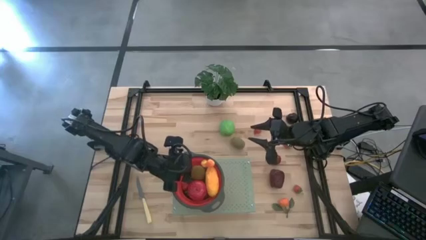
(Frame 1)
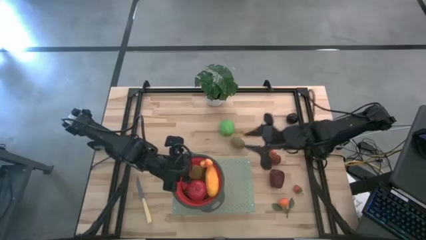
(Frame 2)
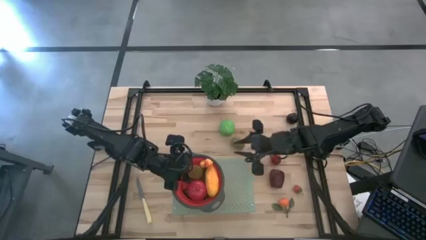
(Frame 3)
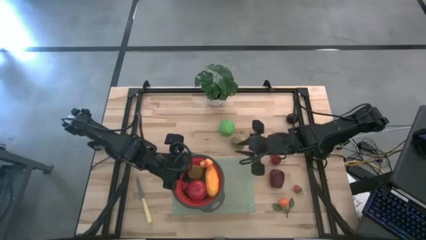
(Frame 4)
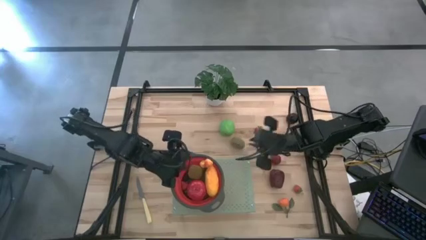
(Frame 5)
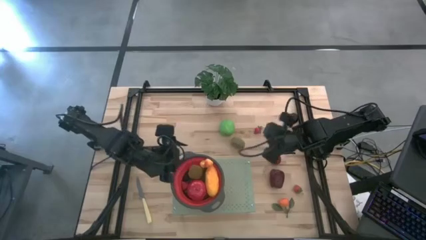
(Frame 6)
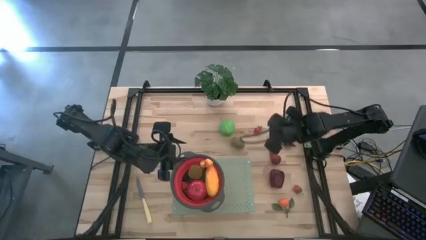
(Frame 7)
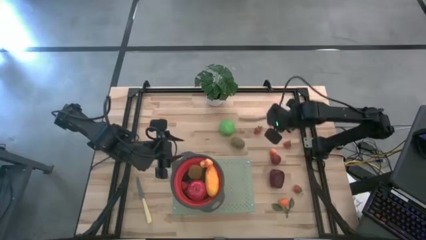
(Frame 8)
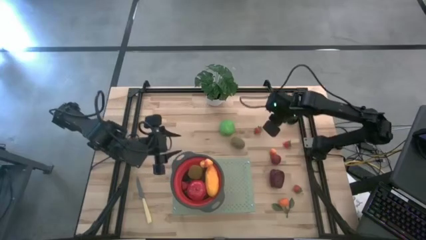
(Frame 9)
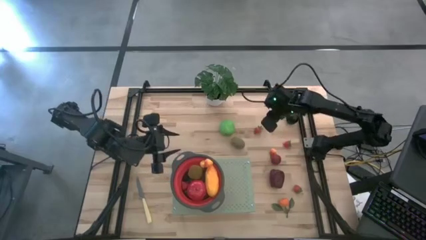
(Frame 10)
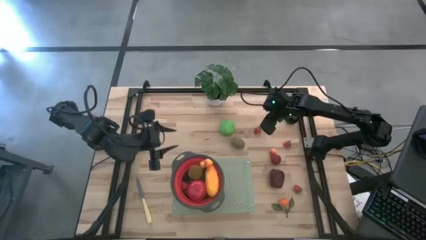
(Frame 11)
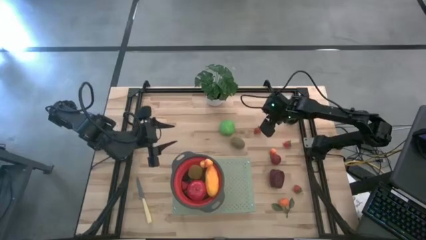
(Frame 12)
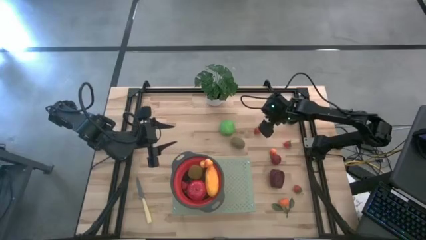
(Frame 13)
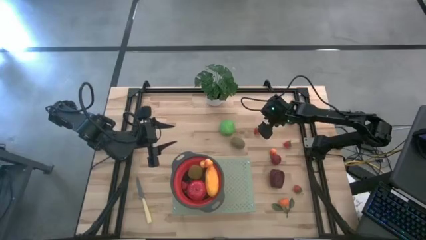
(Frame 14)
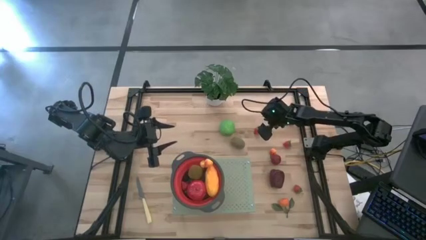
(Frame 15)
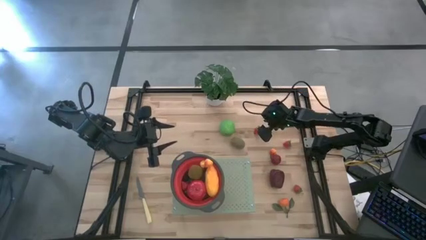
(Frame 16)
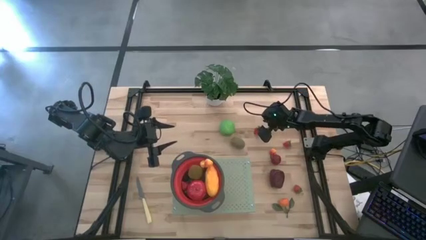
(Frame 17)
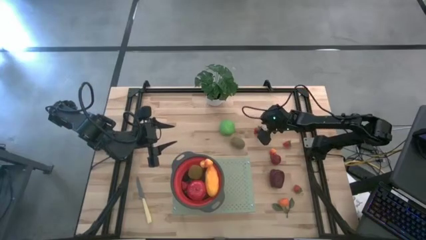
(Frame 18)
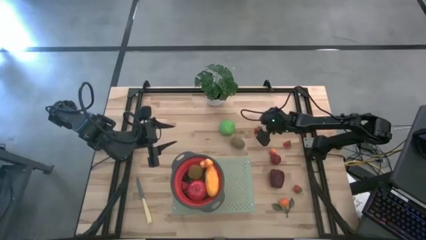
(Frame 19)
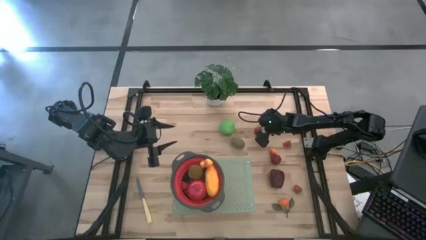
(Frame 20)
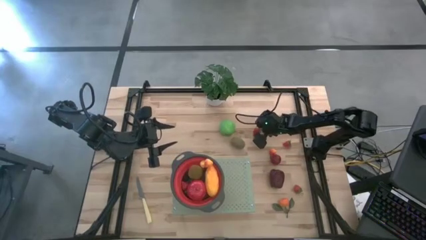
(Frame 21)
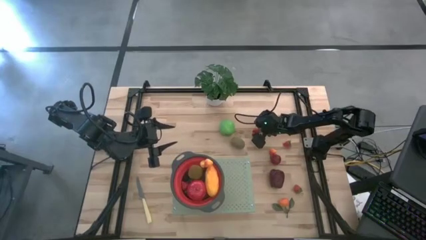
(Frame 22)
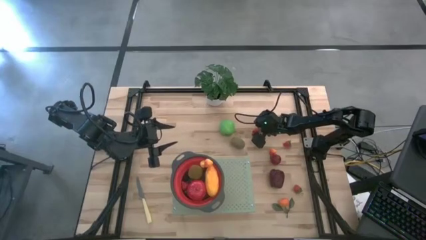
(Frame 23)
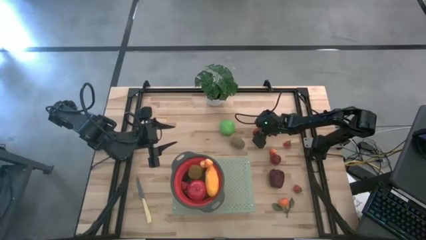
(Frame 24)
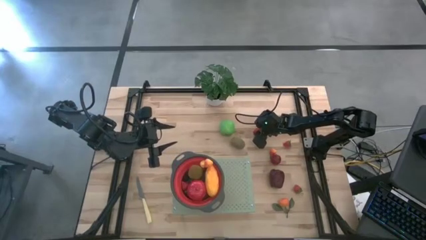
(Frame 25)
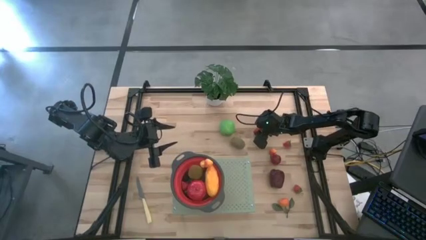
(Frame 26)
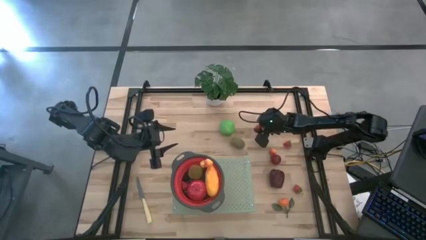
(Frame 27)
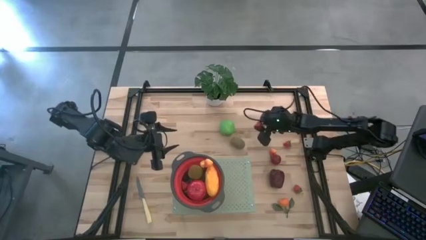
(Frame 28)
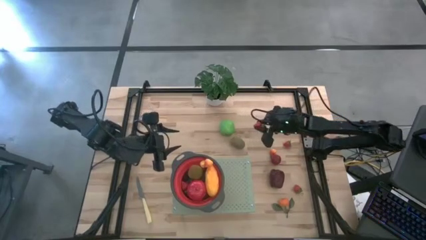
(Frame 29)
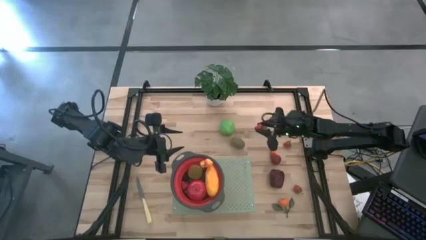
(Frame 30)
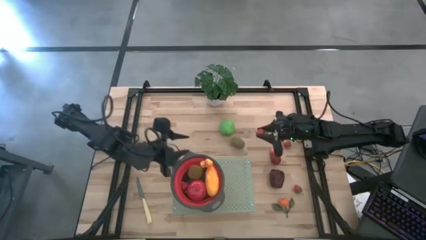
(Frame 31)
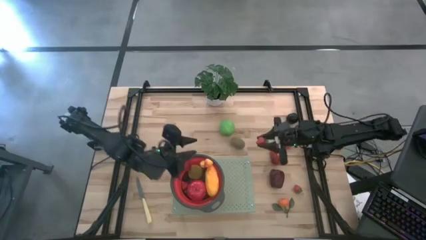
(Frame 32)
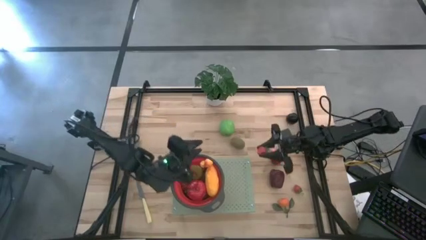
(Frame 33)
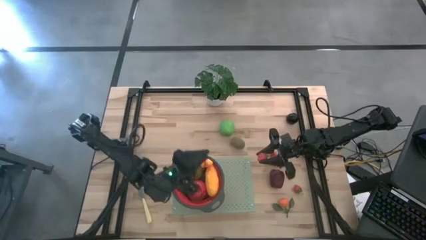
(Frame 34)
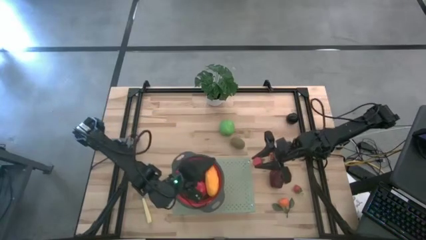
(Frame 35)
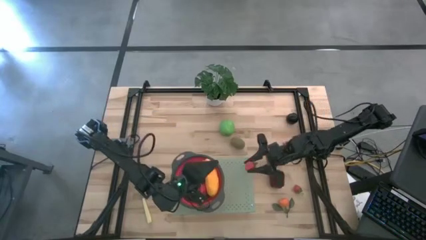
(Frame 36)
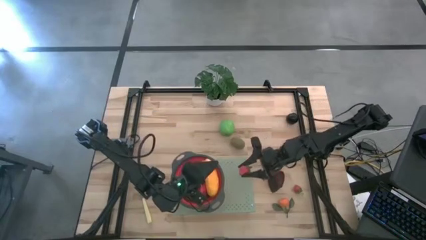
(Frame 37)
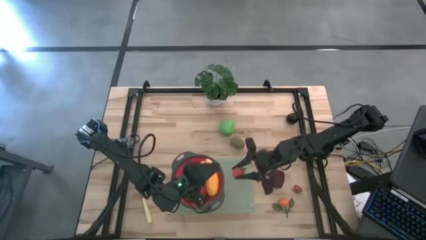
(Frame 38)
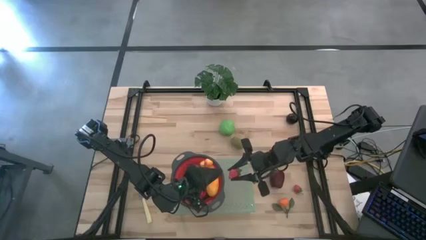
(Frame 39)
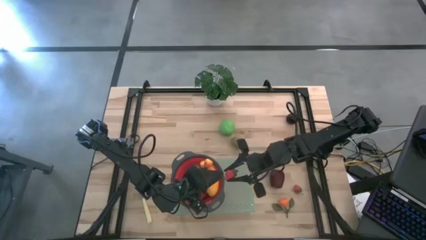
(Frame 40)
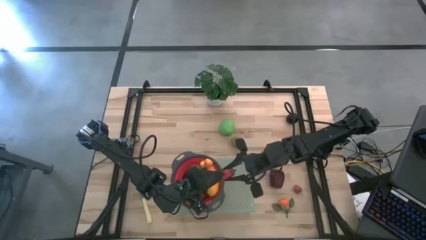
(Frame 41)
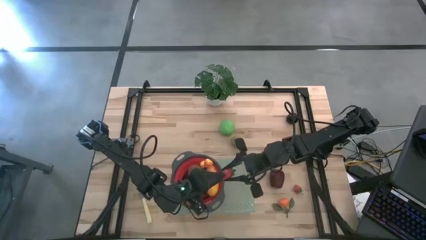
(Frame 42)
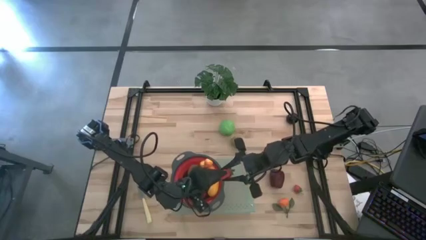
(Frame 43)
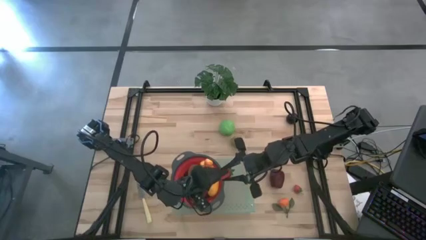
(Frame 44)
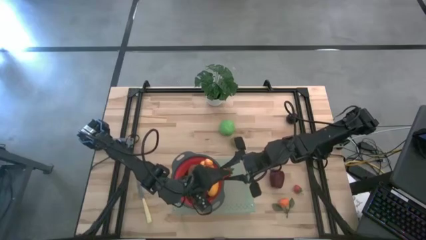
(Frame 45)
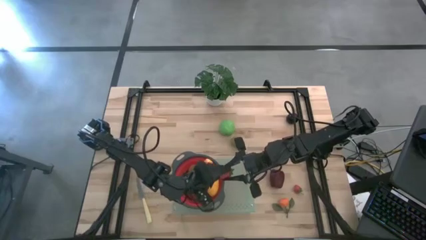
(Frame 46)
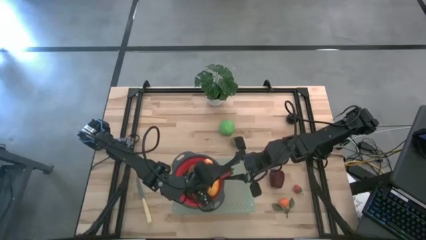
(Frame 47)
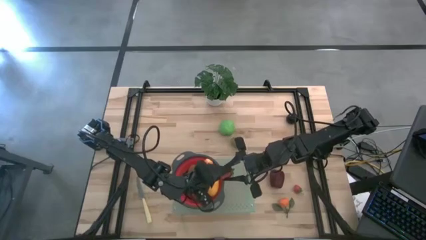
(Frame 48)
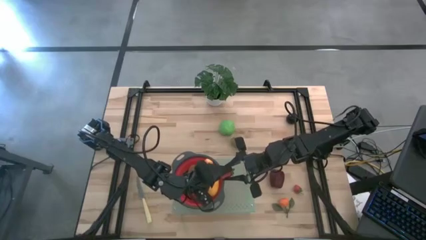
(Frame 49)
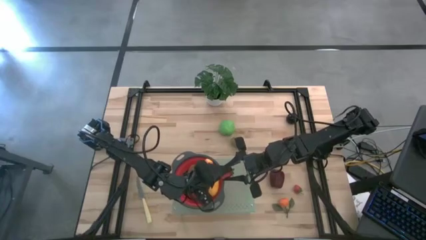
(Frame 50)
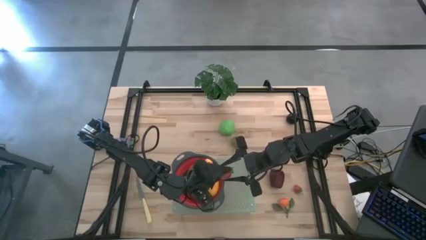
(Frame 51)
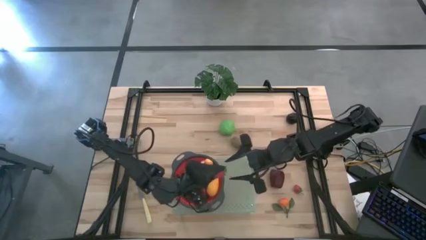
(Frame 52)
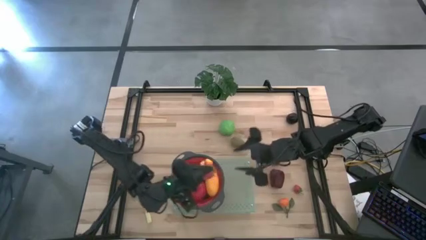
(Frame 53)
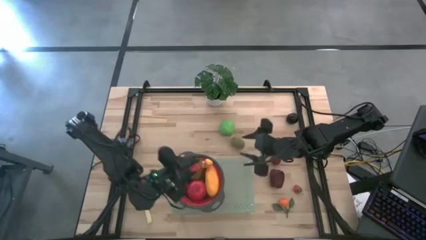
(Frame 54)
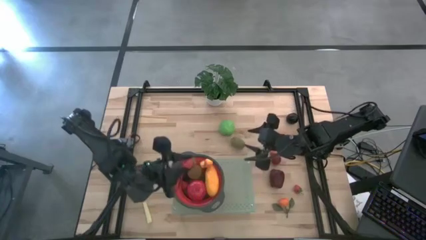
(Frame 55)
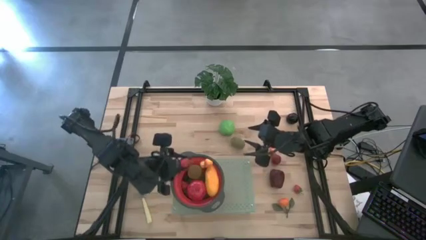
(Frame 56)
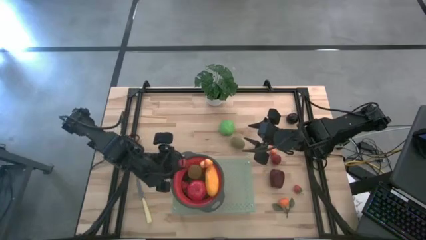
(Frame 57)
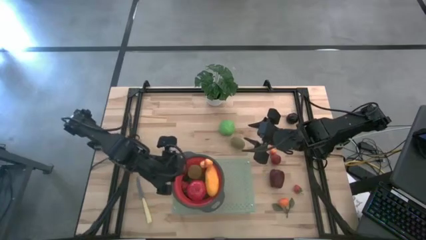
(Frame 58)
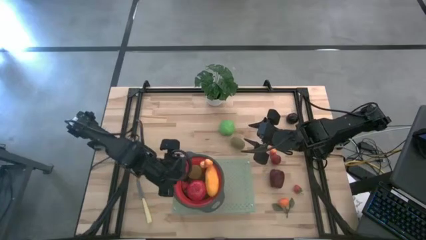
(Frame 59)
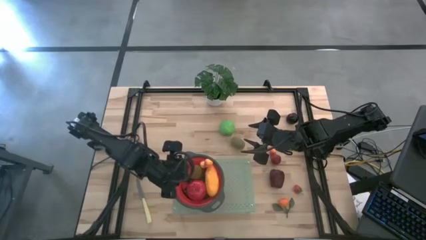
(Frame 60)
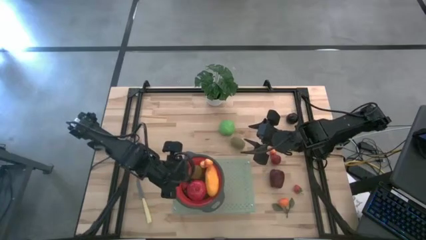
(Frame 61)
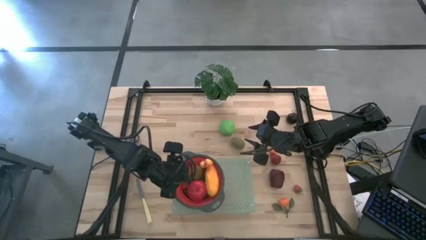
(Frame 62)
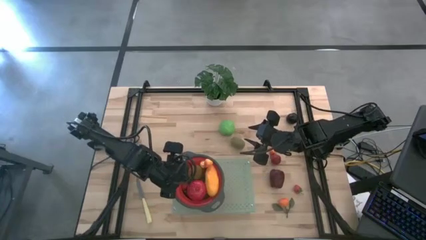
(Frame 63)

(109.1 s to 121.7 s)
Task: Pick & Place Fruit
Put the top strawberry into the red strainer

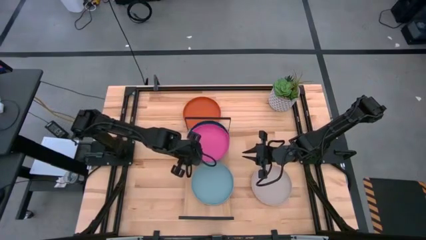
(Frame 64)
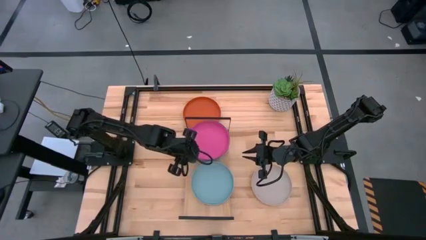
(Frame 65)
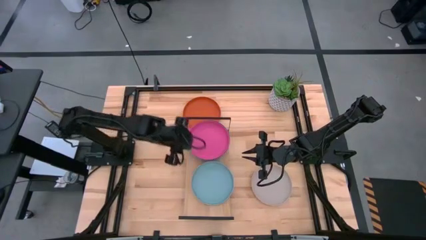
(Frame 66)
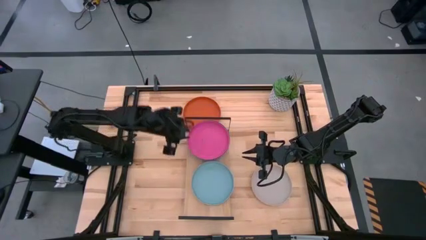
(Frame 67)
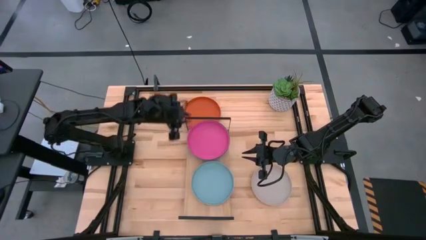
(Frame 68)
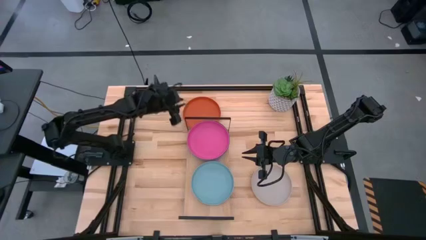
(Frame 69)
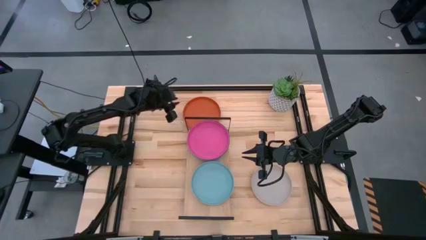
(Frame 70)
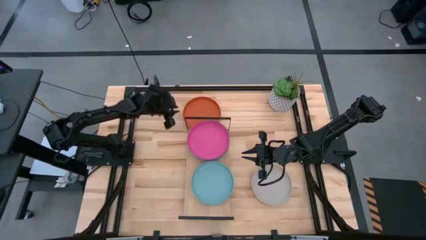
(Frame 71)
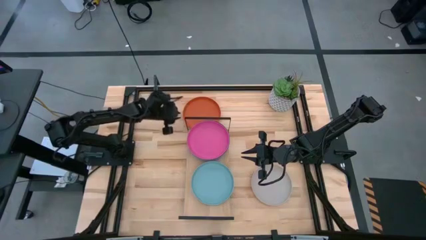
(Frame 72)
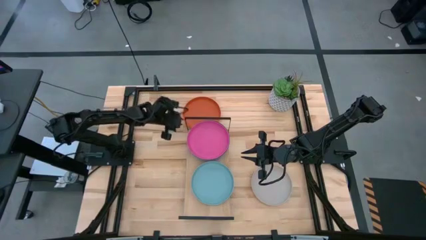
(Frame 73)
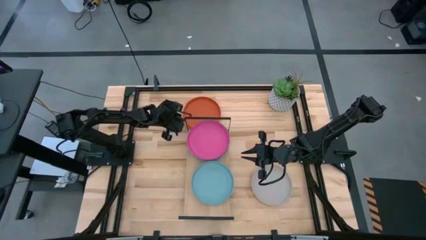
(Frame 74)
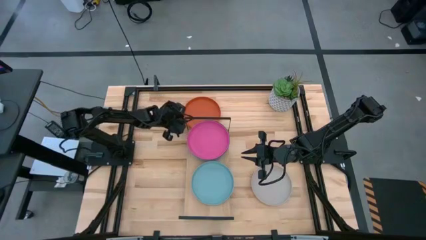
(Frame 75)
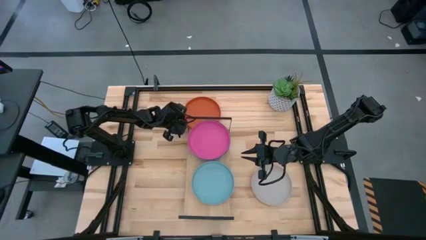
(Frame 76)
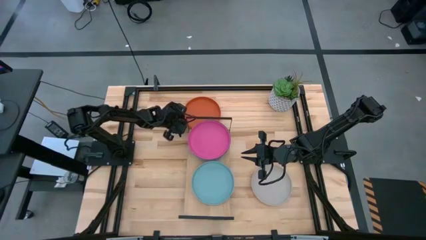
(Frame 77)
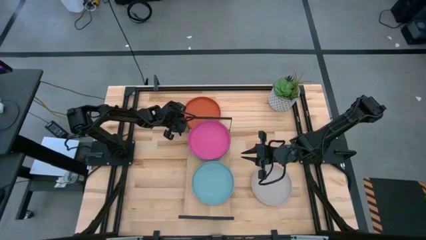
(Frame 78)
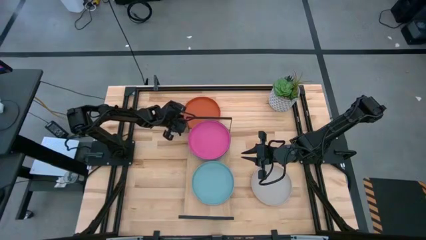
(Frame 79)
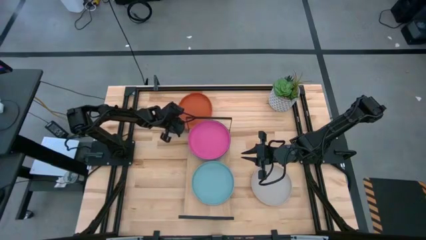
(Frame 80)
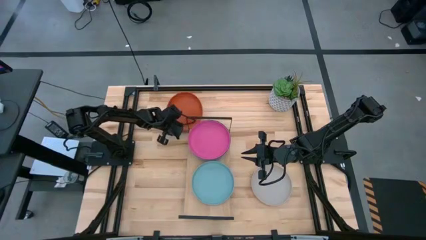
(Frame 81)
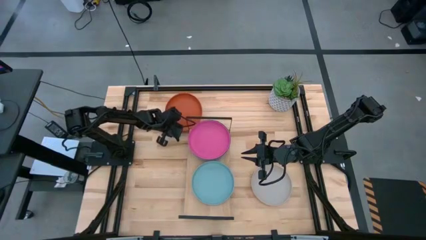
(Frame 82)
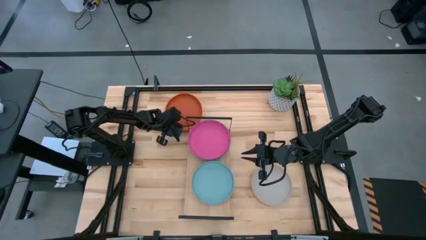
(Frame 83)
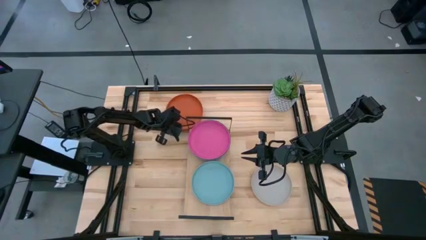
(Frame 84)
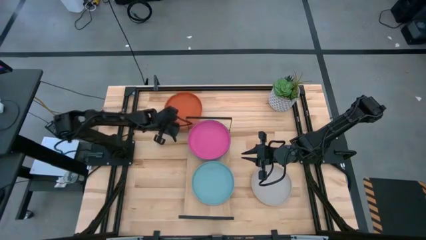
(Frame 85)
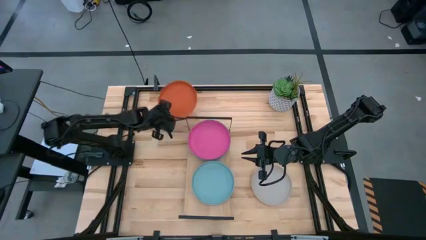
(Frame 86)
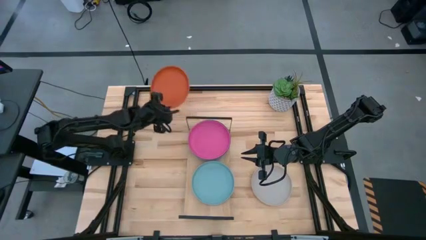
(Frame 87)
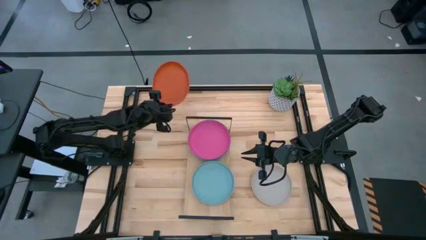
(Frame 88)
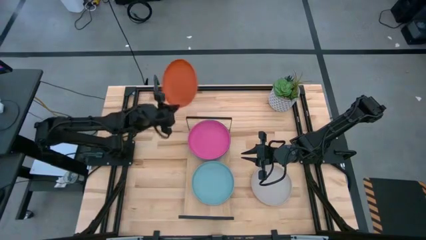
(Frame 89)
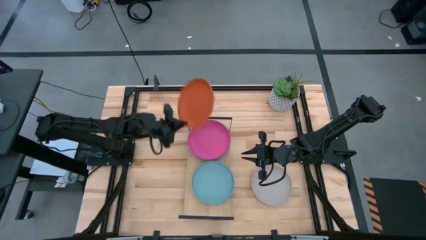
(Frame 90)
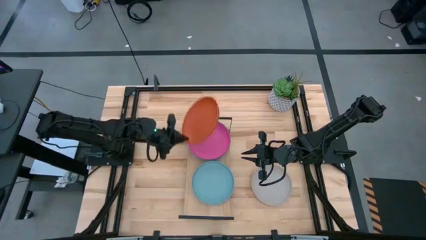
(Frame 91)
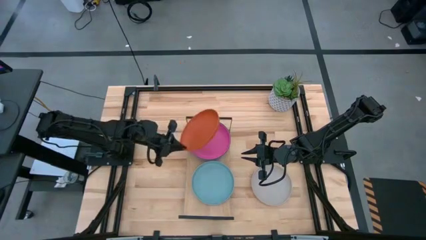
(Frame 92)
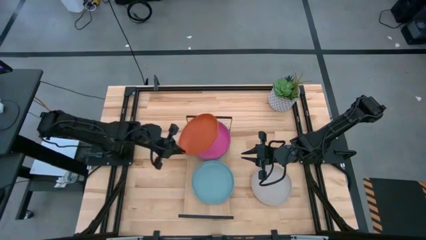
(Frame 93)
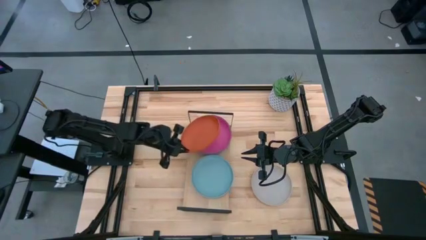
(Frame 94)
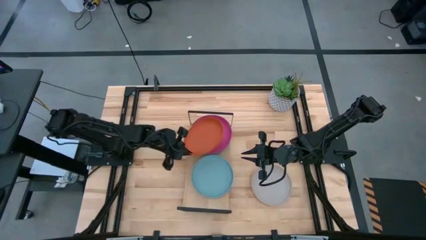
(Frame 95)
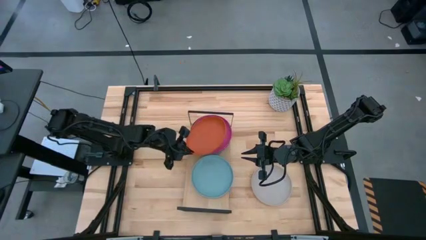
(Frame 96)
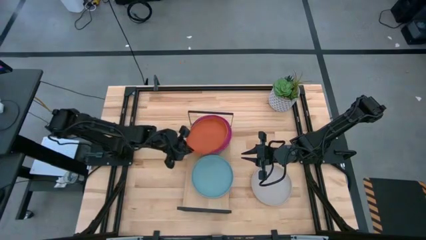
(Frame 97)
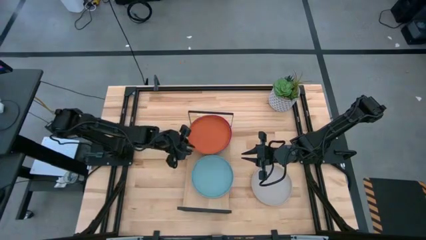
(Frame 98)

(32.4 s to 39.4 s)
Task: Place and stack plates onto a shelf
Stack the orange plate on top of the pink plate
